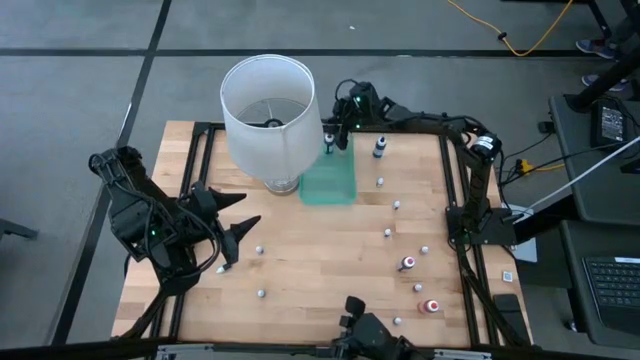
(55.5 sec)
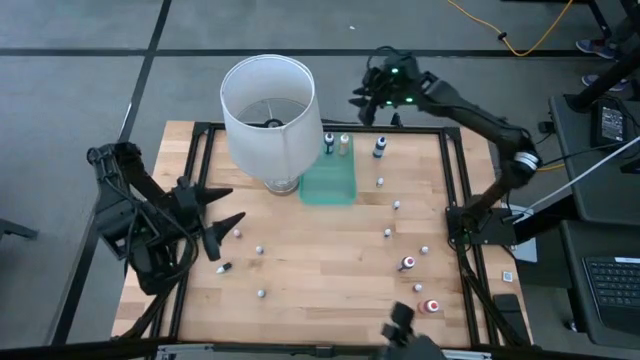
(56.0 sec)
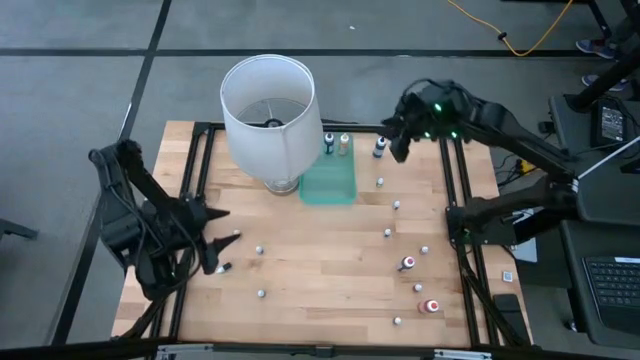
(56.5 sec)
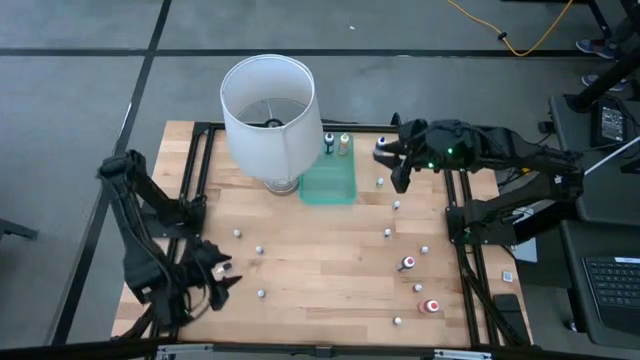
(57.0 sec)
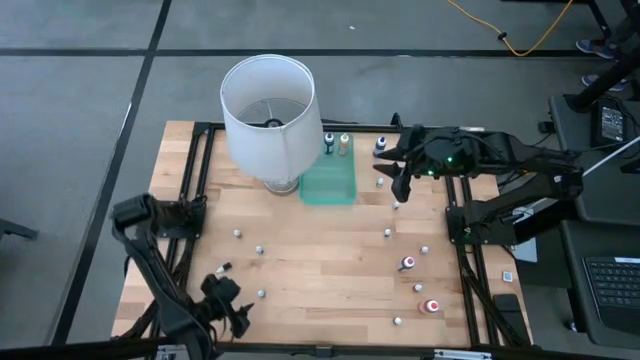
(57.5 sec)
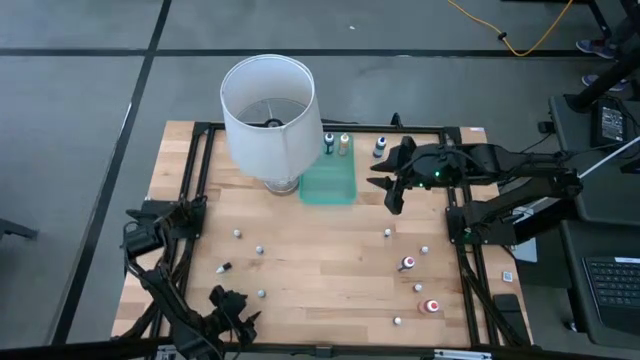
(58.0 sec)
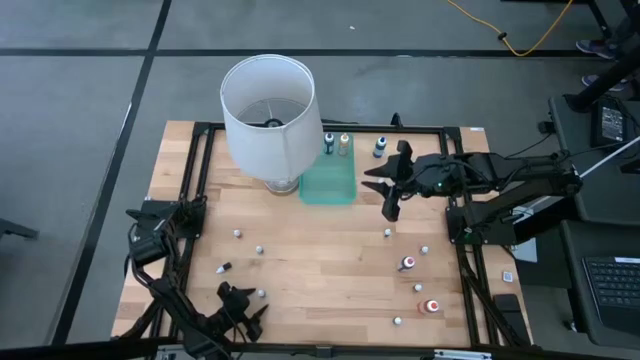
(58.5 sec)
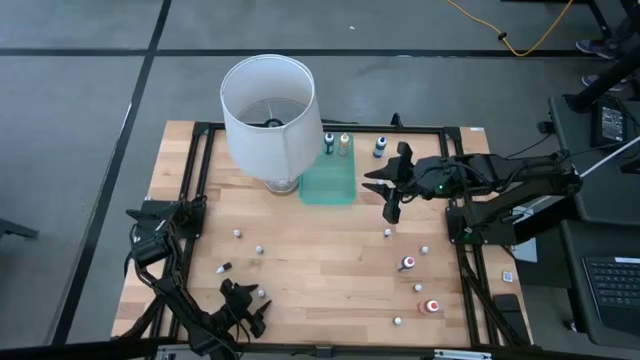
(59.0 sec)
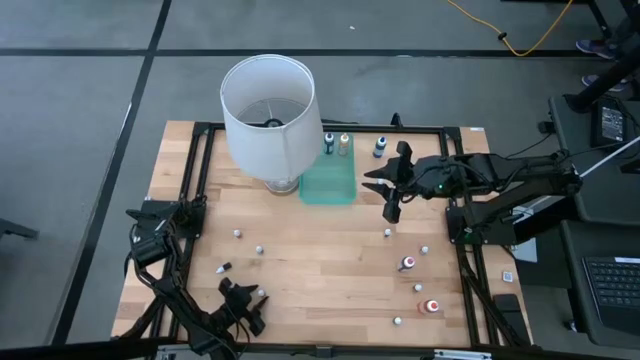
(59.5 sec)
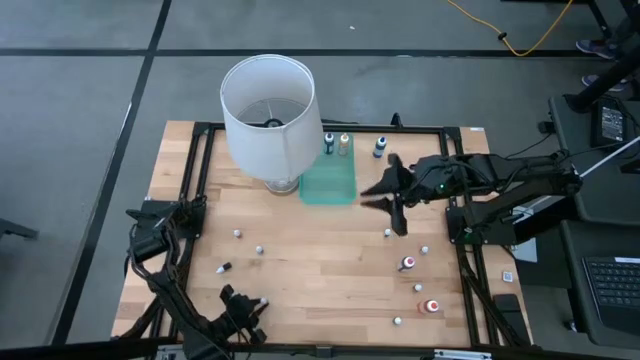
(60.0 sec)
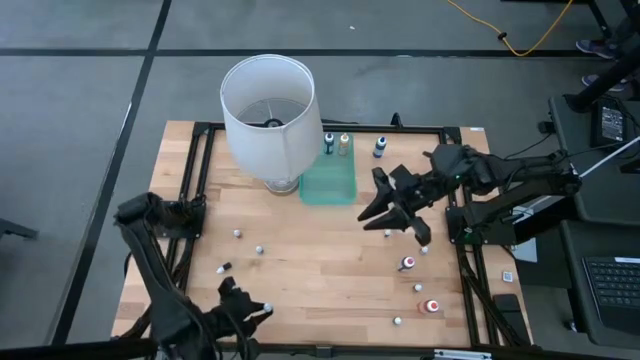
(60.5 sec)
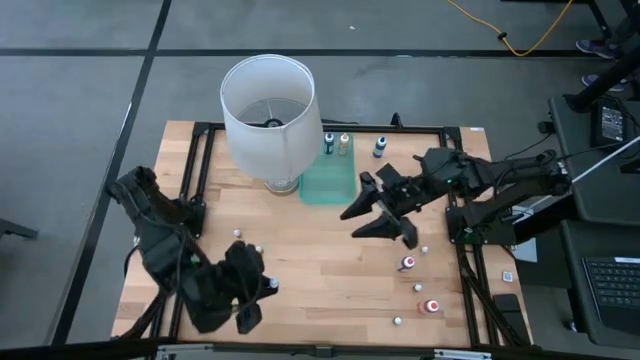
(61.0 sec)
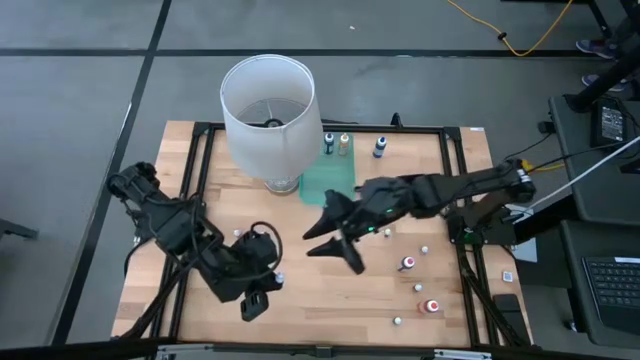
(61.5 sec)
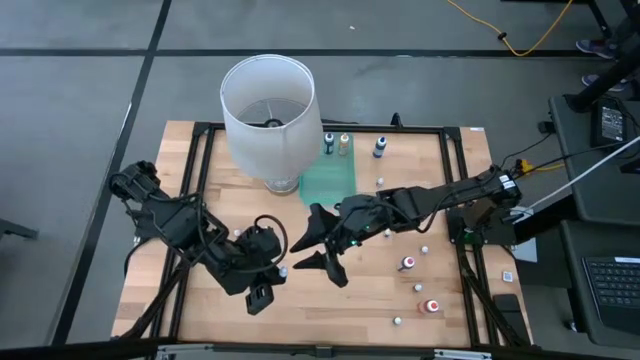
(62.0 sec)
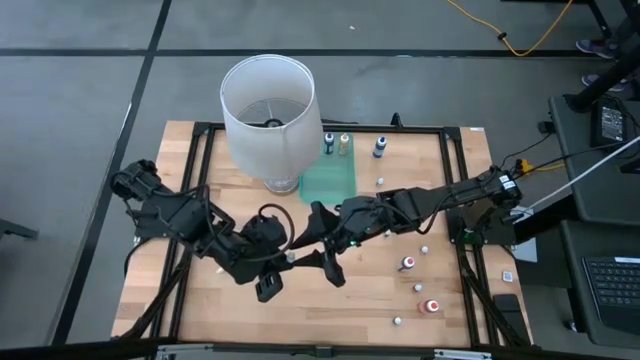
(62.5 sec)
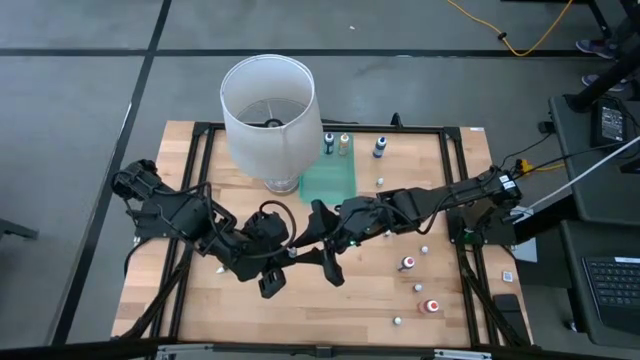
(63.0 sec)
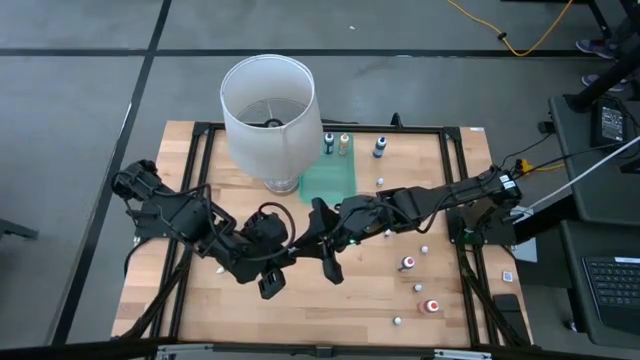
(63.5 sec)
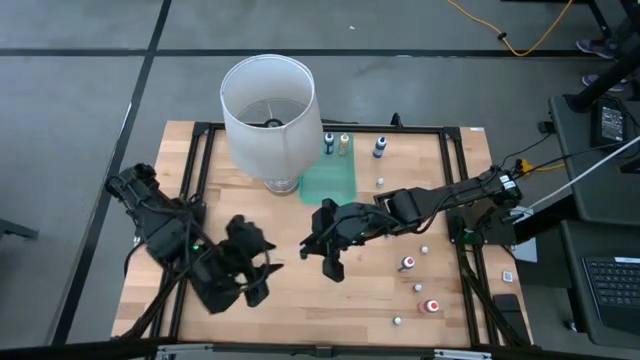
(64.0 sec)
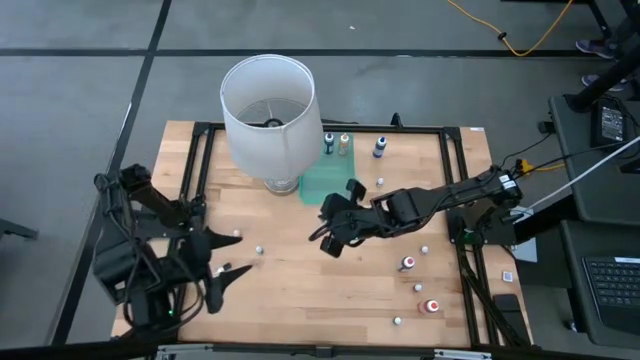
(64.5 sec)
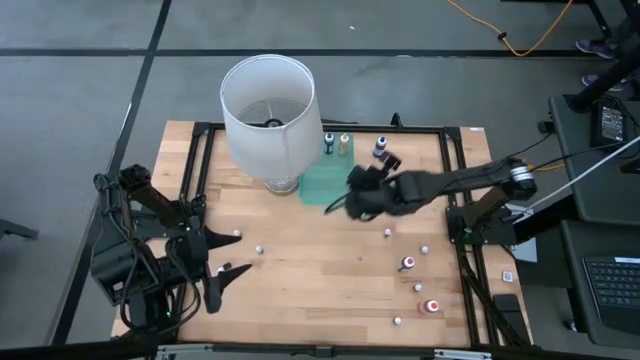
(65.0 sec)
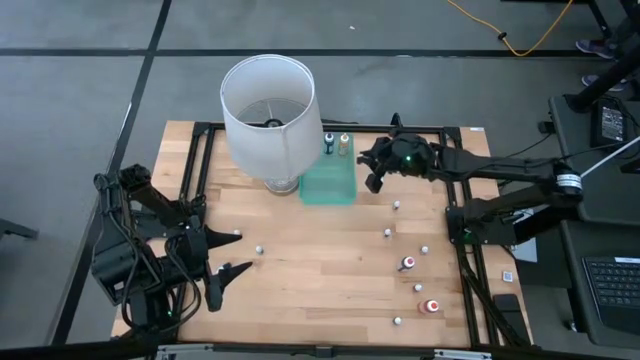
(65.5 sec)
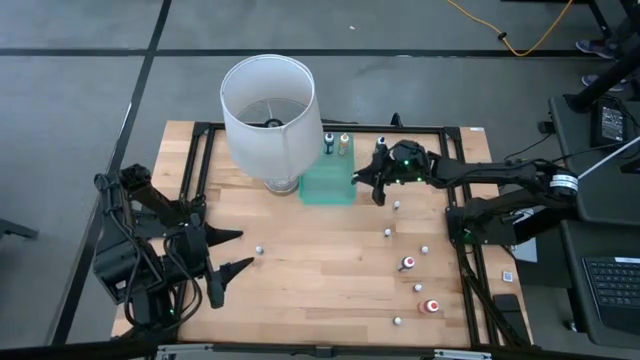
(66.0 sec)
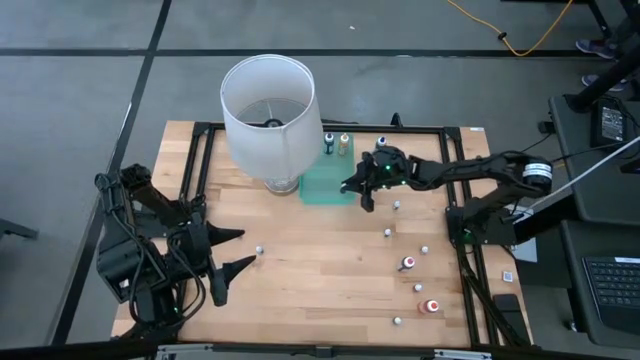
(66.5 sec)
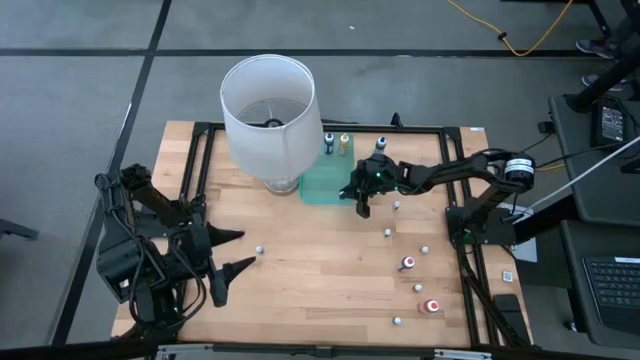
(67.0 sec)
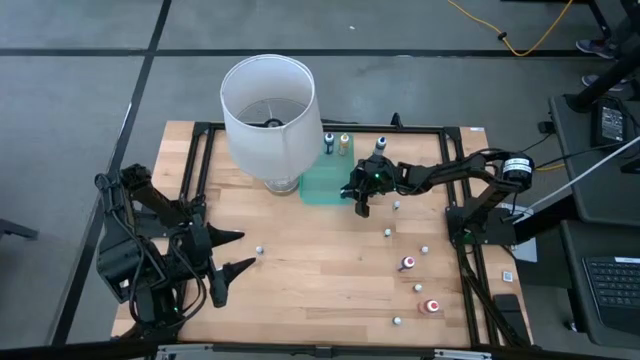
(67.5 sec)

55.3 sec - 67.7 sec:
Task: Pick & Place food coloring
Put the small blue food coloring bottle into the green bin

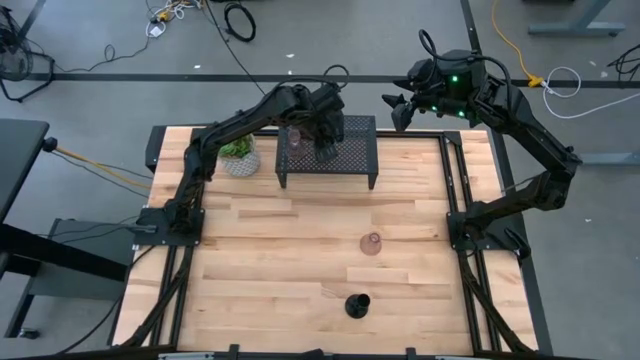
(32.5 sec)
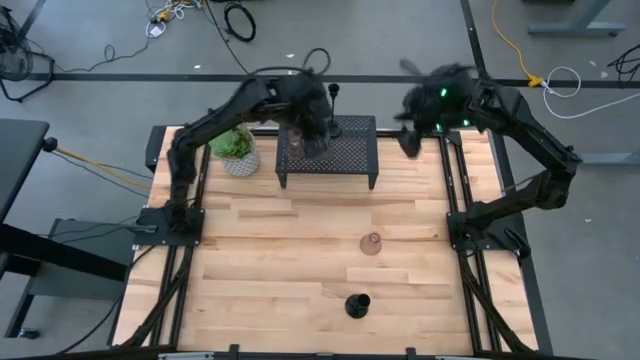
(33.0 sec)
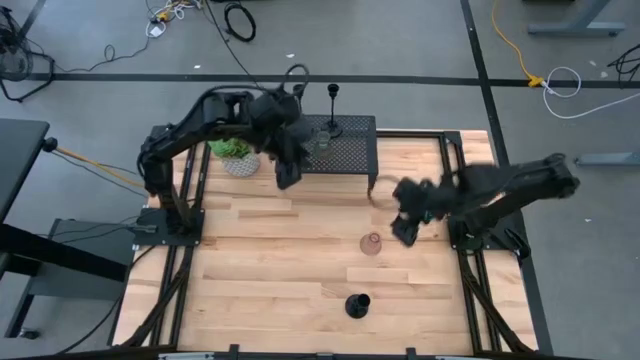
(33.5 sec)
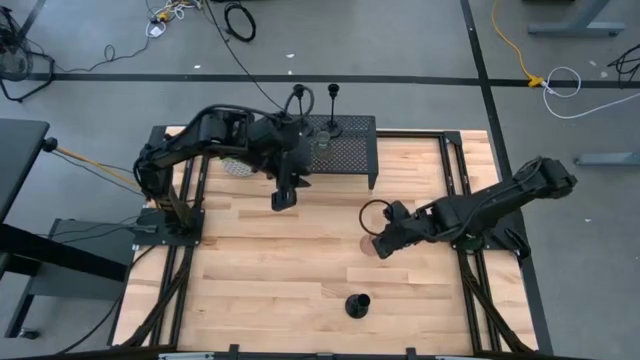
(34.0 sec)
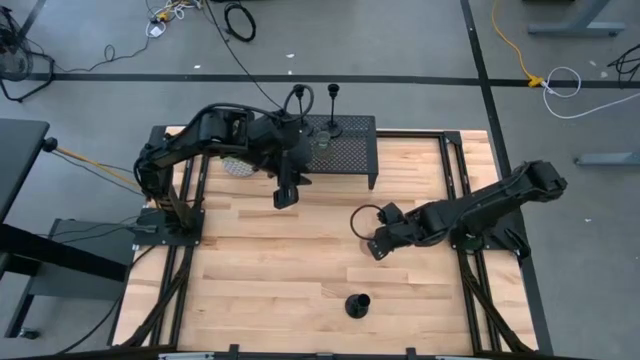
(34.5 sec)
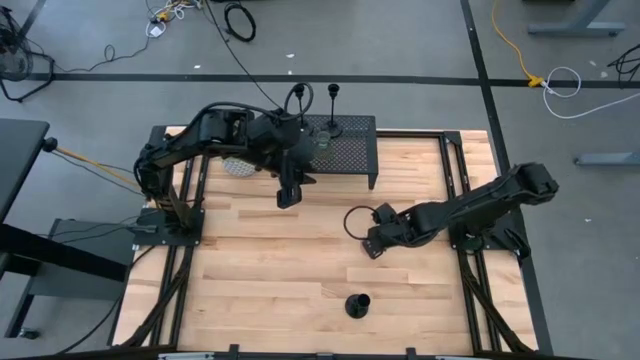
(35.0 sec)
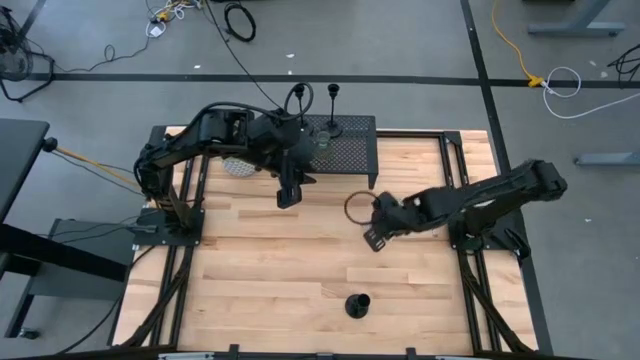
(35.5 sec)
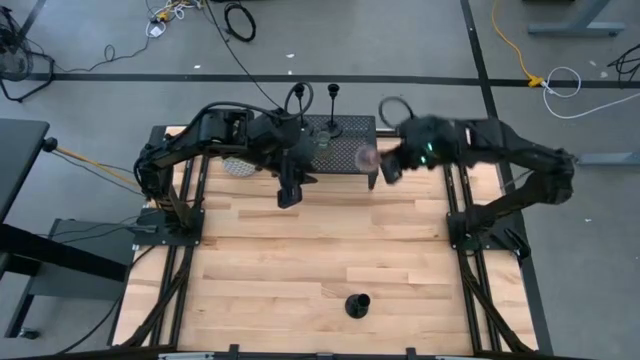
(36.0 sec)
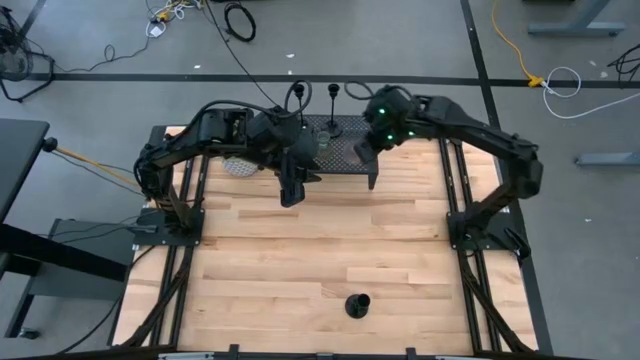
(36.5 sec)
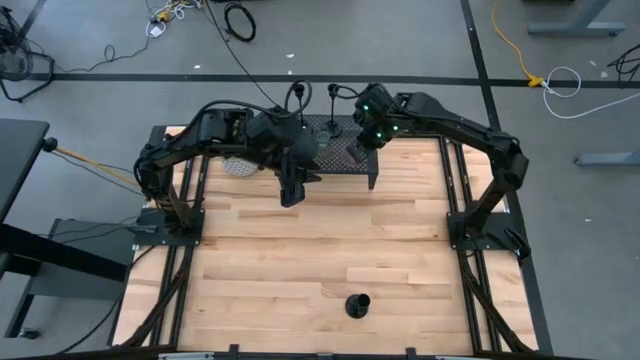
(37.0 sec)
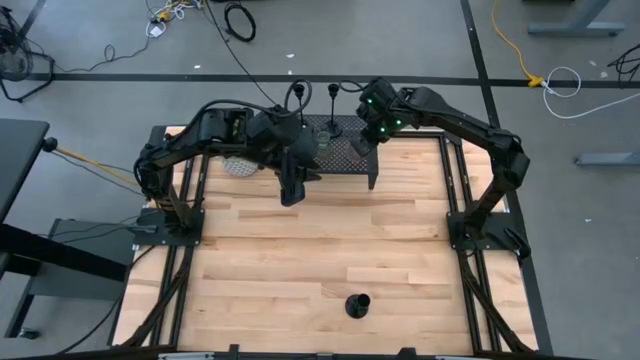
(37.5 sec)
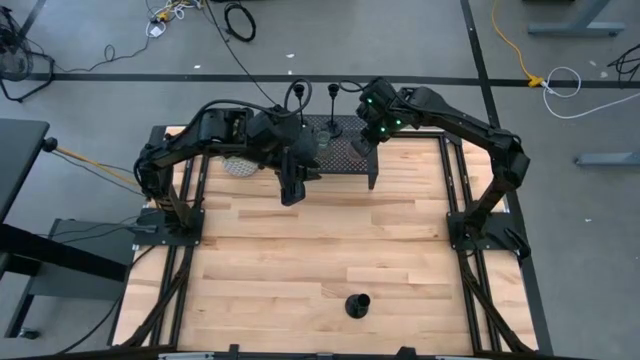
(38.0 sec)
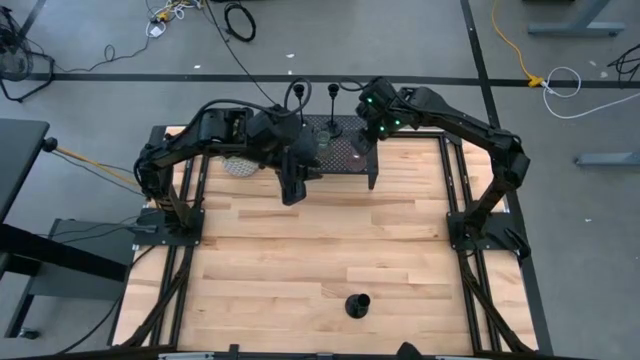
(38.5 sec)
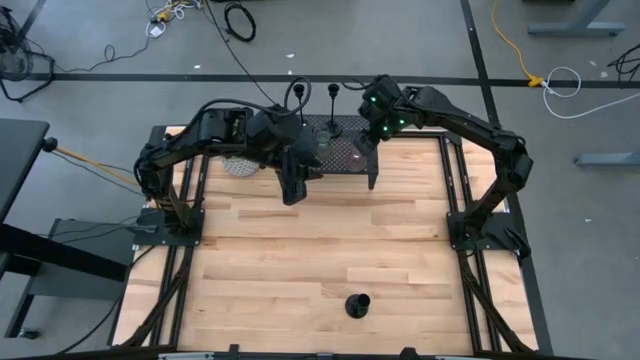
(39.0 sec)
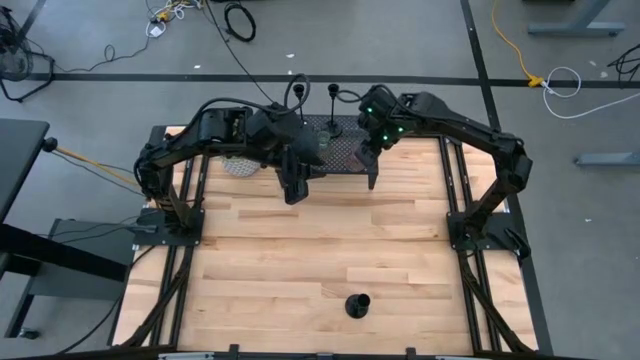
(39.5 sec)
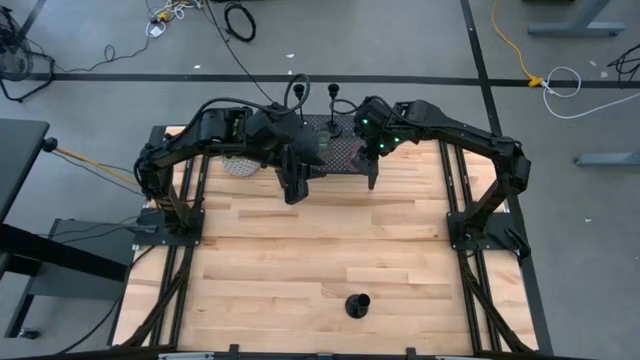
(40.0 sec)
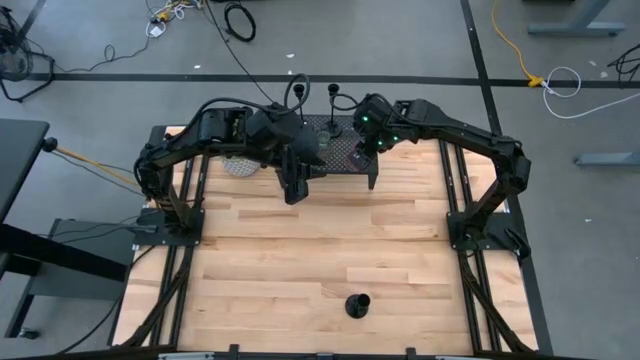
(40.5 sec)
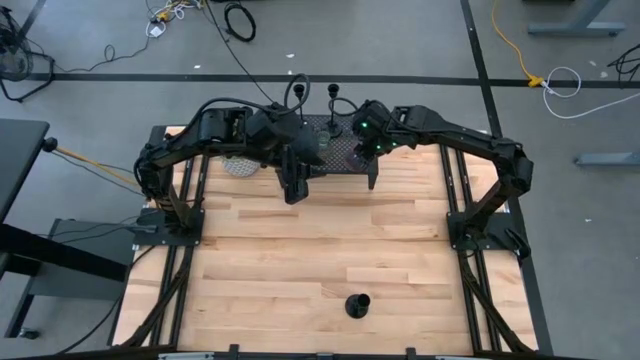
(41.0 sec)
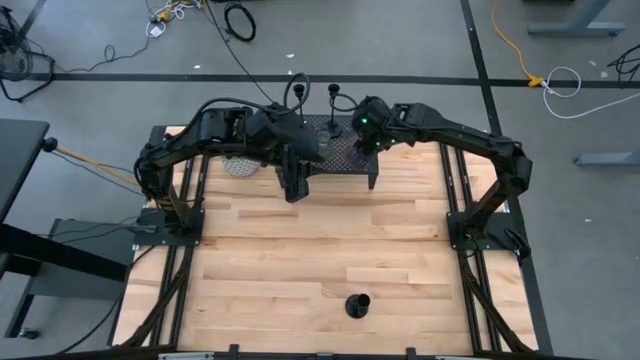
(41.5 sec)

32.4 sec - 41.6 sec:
Task: Pick & Place candle stick holders
Put the pink glass candle holder on the shelf aligned with the other glass candle holders
